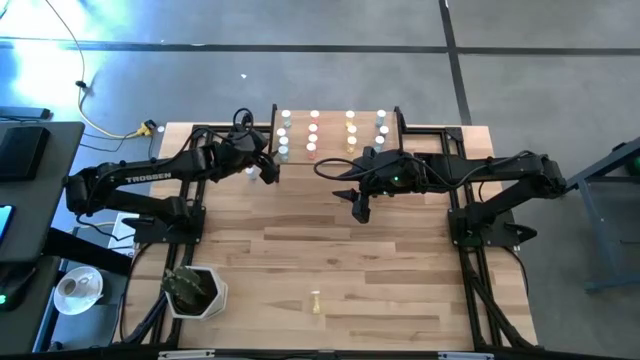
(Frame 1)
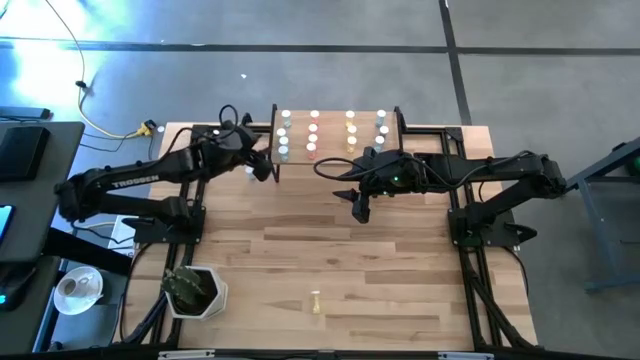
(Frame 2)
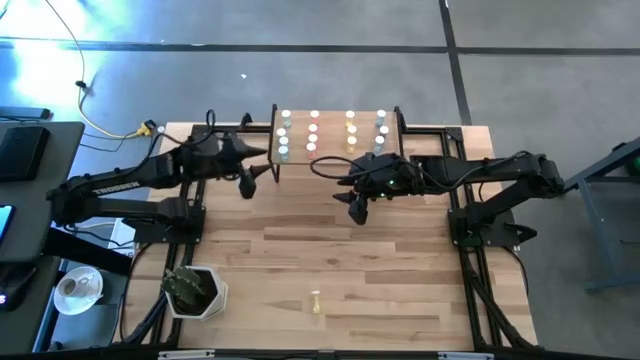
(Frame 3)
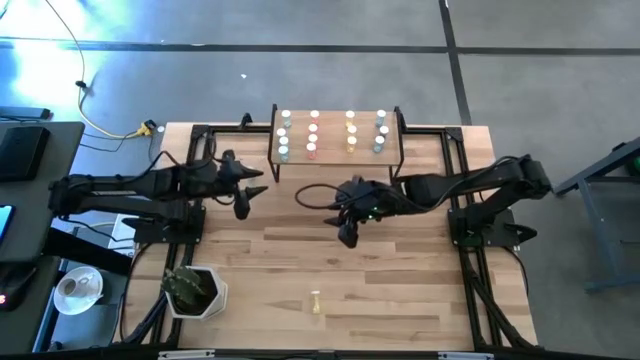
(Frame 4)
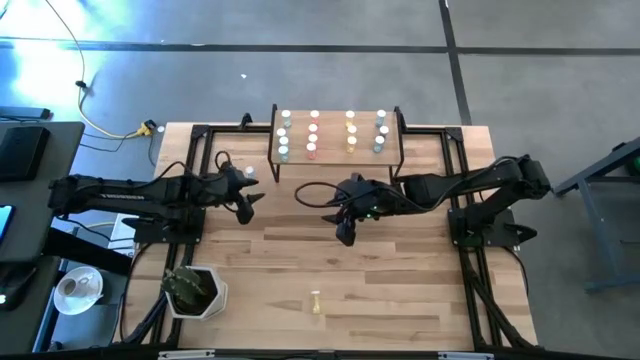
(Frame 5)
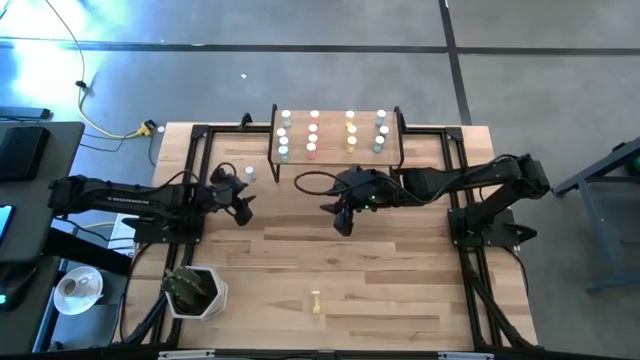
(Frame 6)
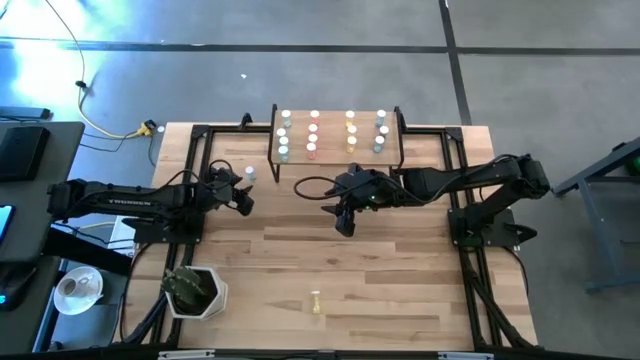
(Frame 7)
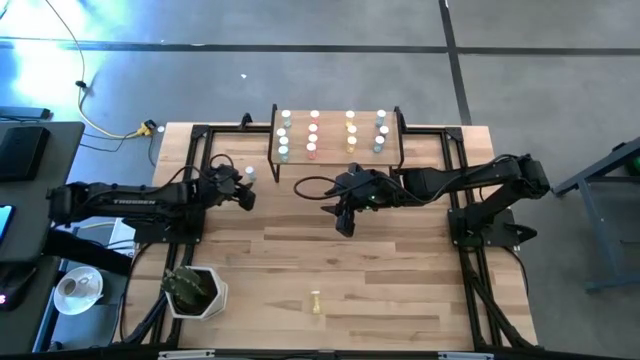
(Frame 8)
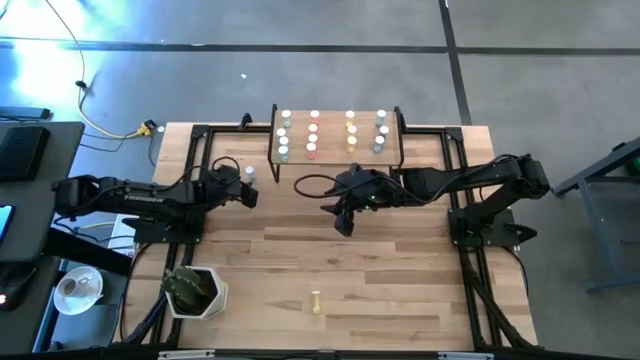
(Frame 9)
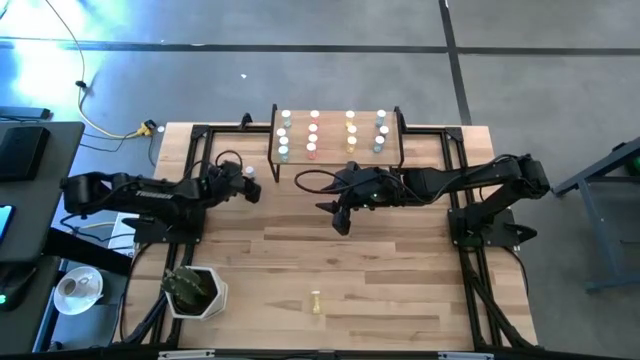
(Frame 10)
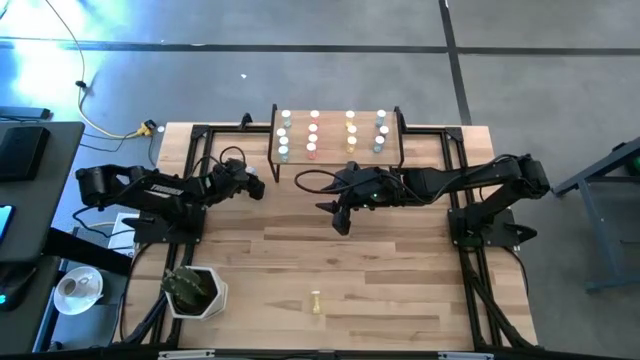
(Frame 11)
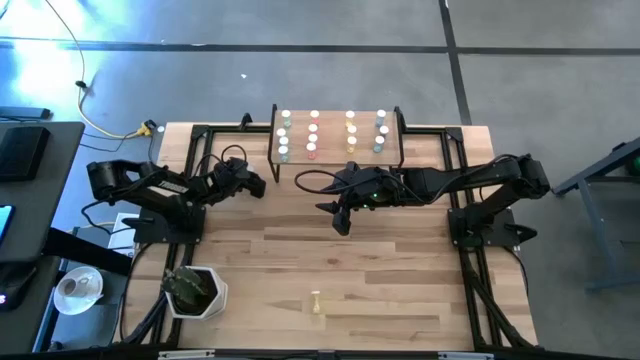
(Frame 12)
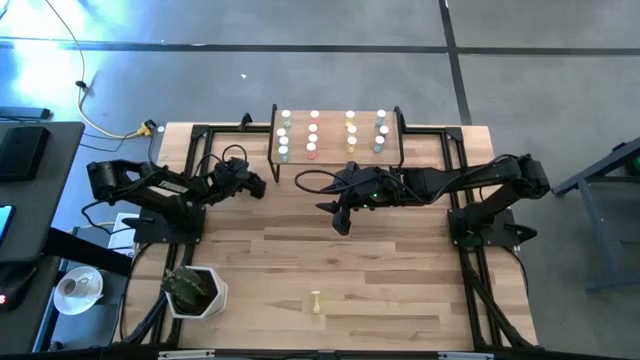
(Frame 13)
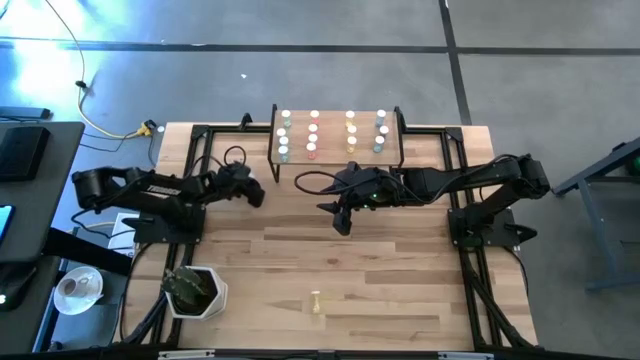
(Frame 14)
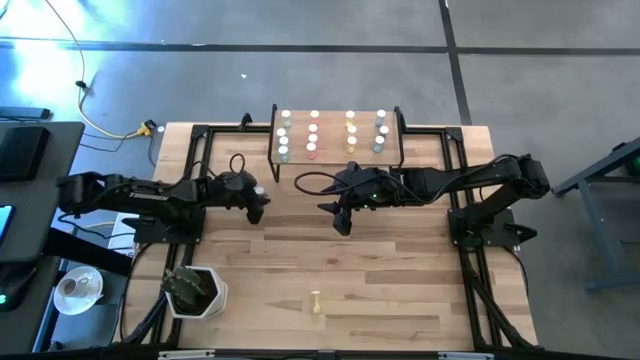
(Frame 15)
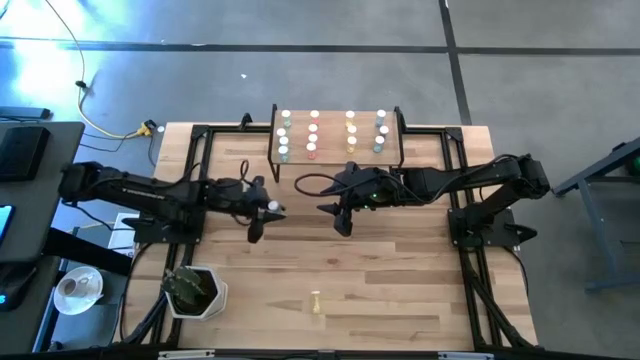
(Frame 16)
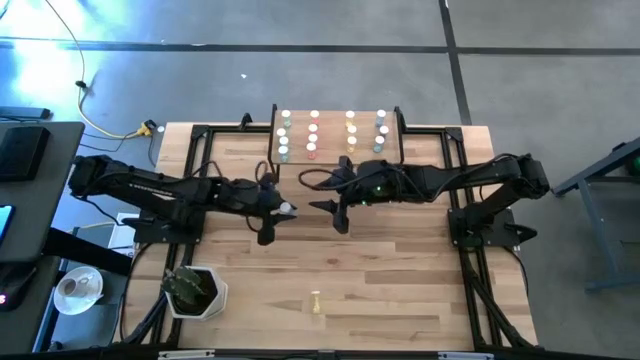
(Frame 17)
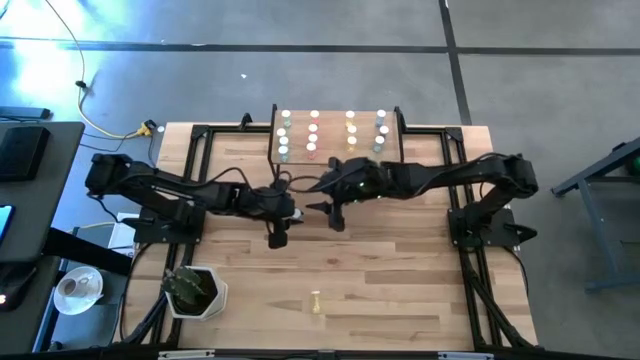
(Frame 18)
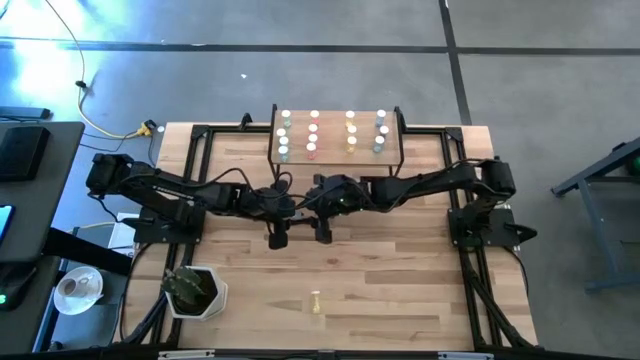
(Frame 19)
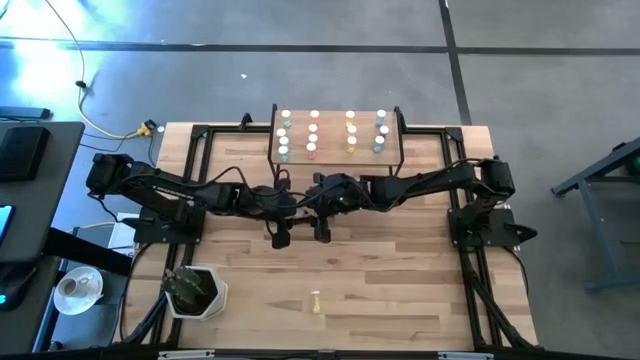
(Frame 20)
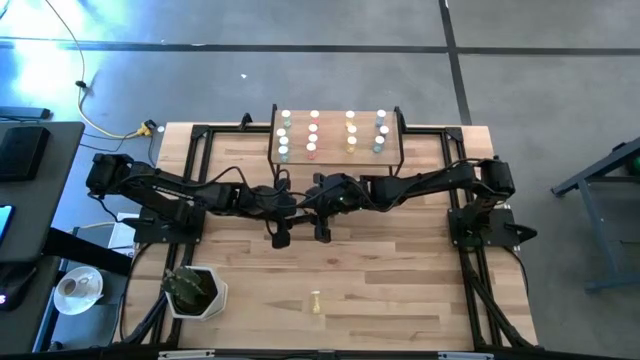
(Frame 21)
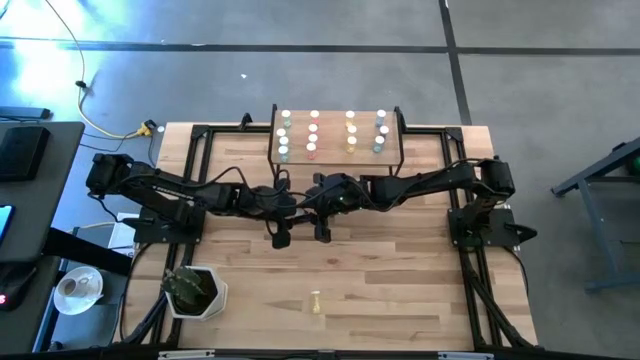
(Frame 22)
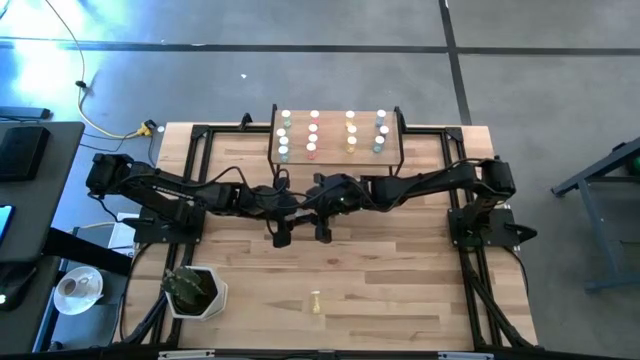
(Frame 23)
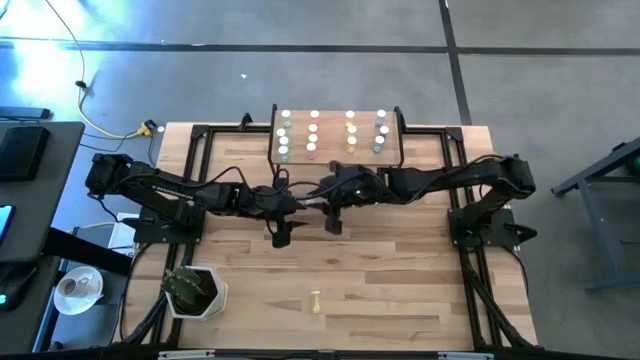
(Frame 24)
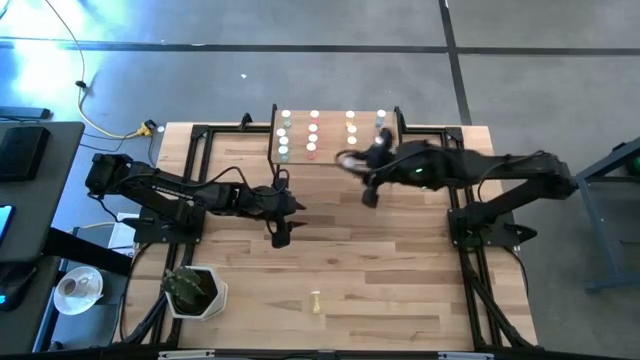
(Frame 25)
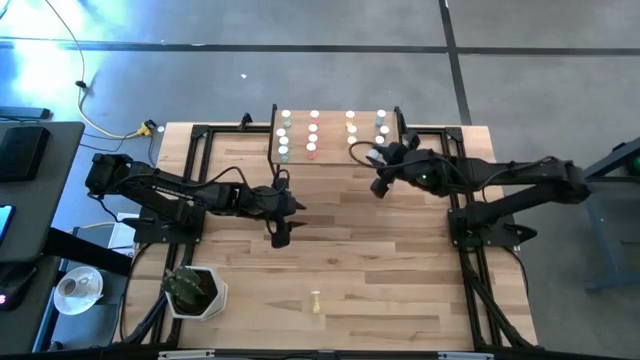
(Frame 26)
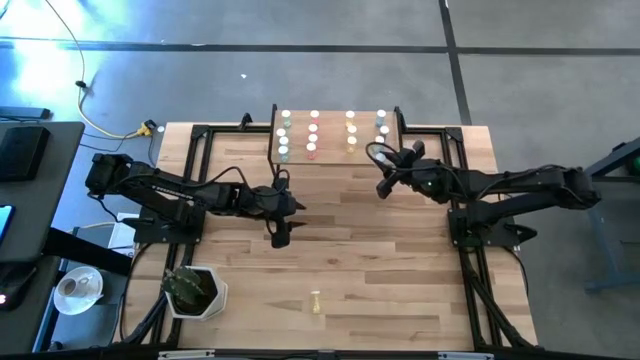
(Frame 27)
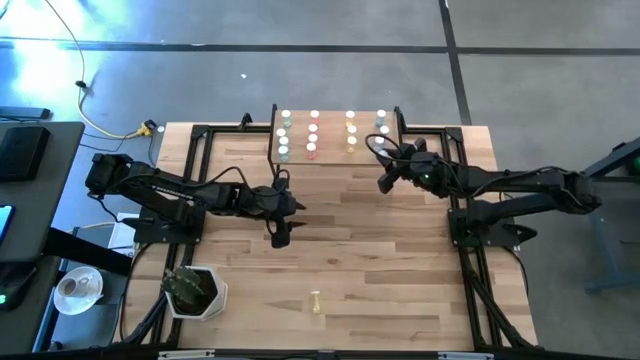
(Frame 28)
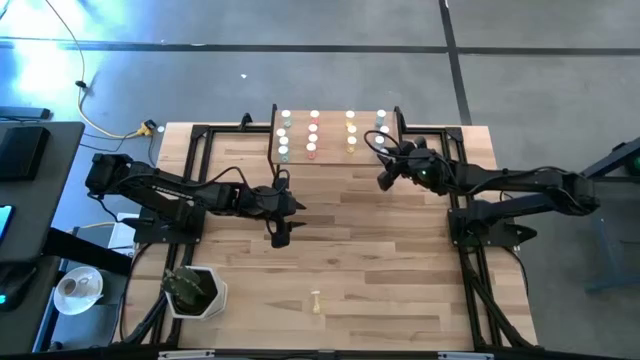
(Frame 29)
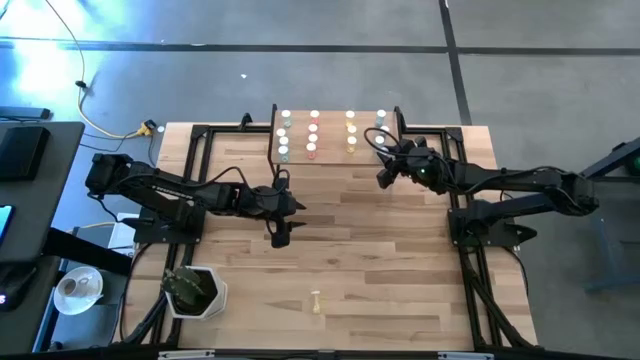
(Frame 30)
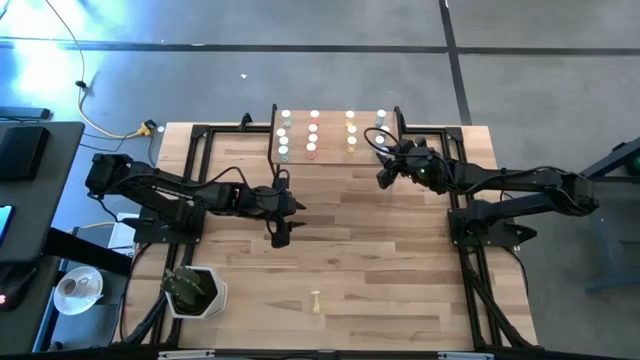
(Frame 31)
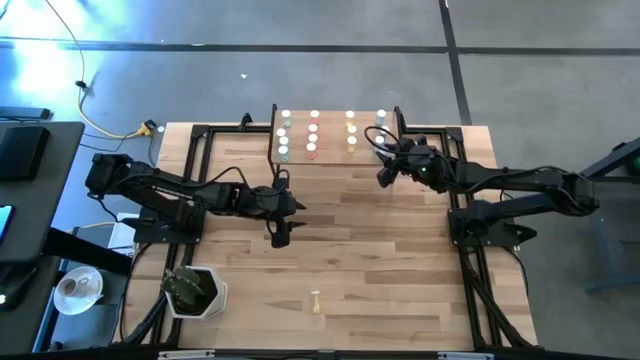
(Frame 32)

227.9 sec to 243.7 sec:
Task: Pick and place medicine bottles onto shelf by color
Put the blue pill bottle on the shelf

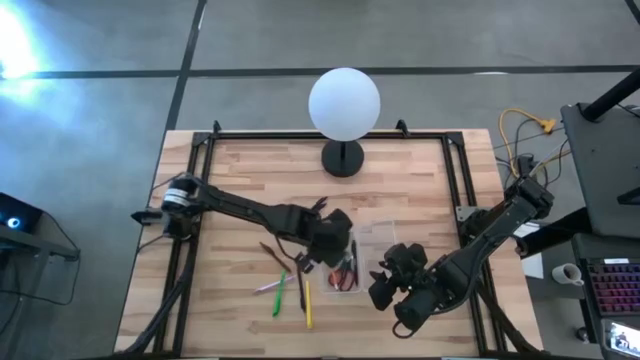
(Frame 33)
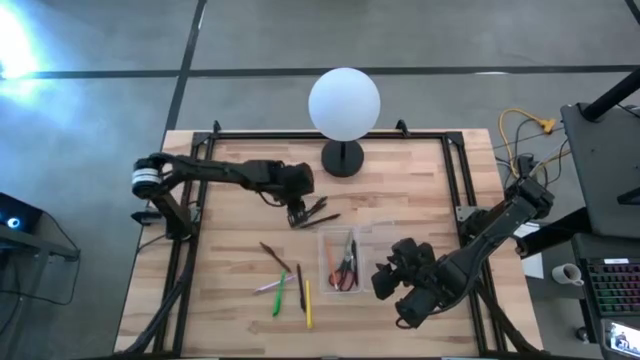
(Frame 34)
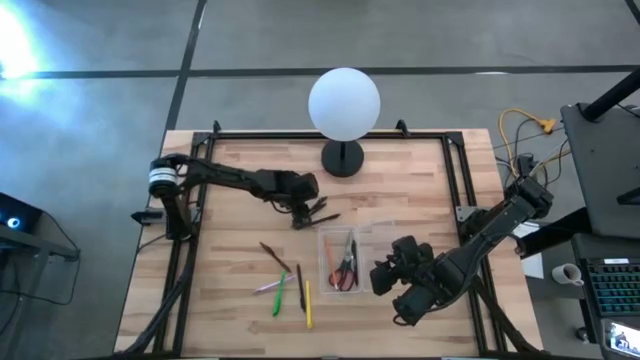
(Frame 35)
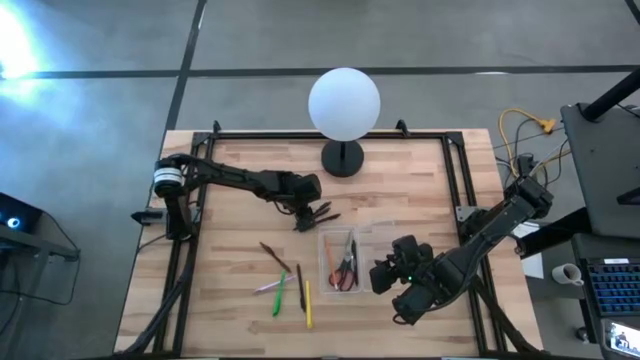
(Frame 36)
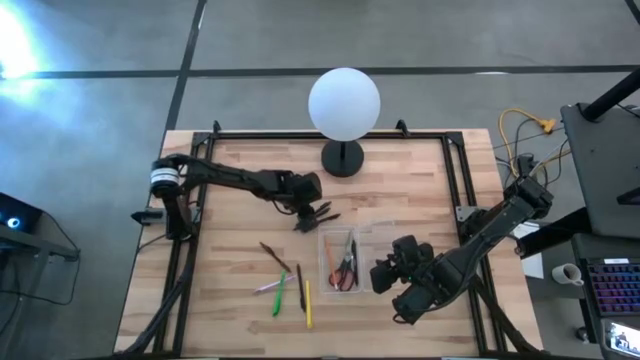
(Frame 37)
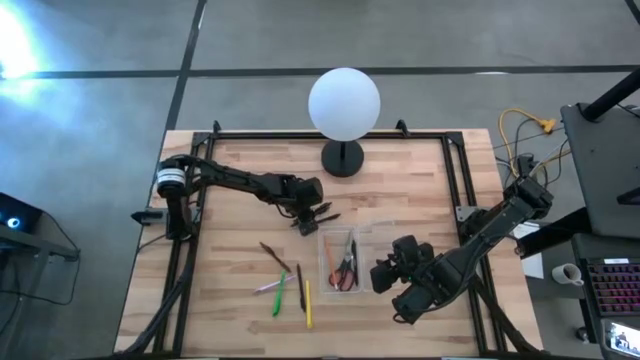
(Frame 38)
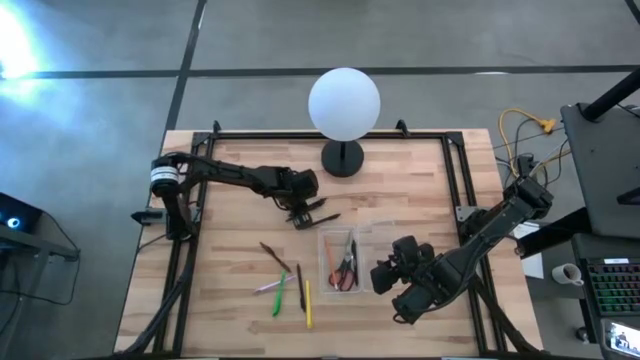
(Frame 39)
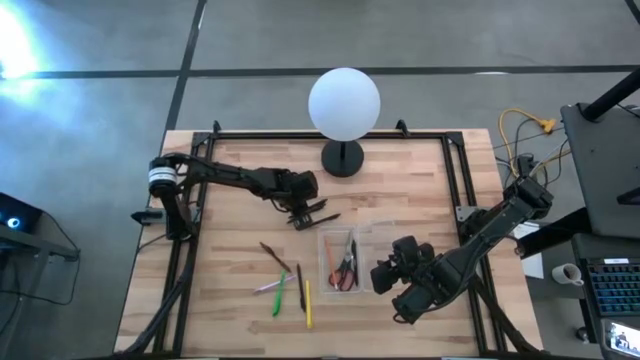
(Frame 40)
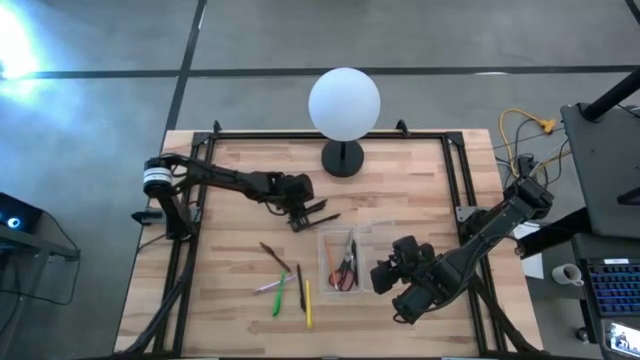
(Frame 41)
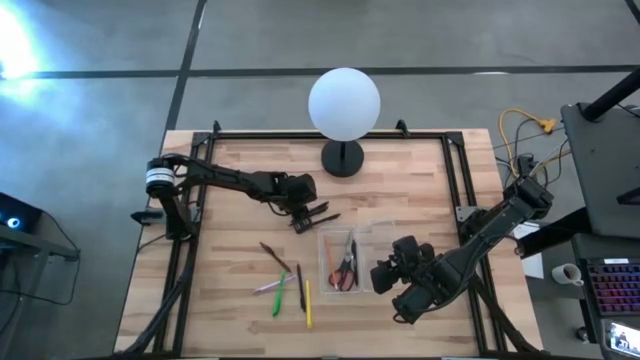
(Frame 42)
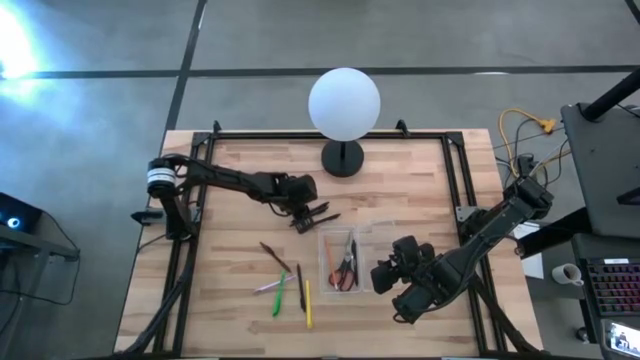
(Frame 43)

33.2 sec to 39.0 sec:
Task: Pick & place school supplies into a supply box
Put the black pen into the transparent supply box
